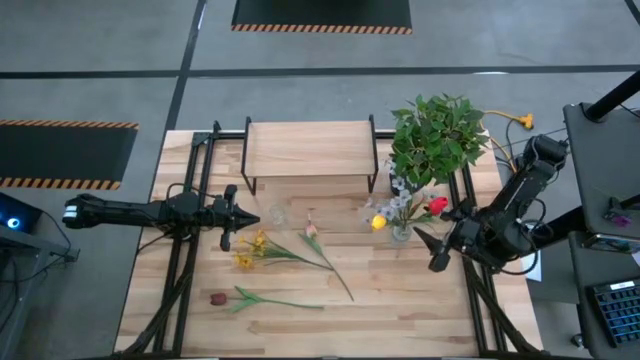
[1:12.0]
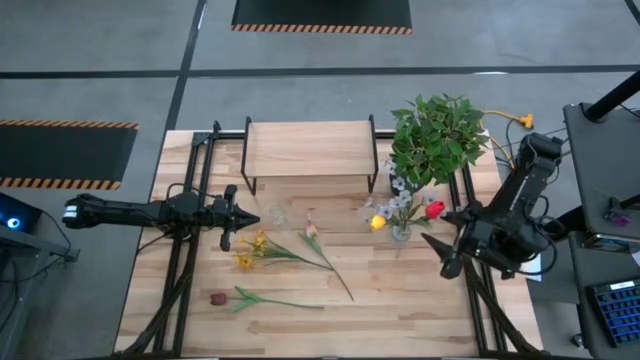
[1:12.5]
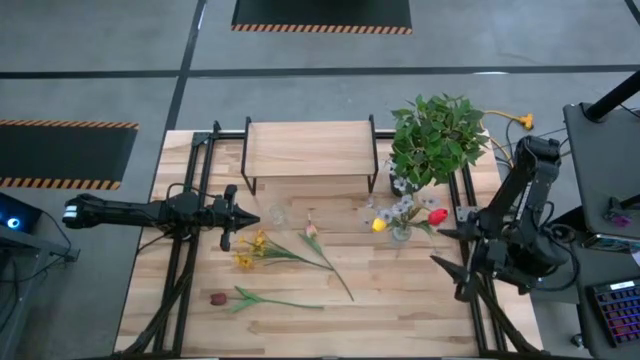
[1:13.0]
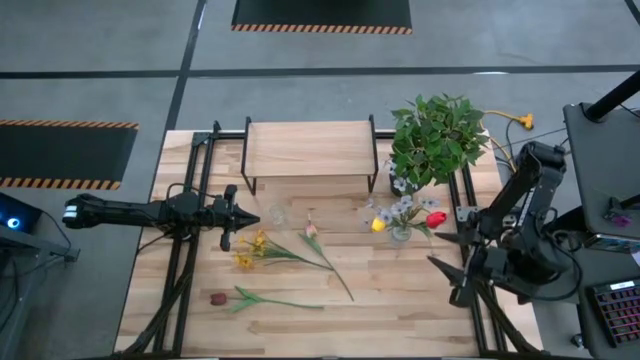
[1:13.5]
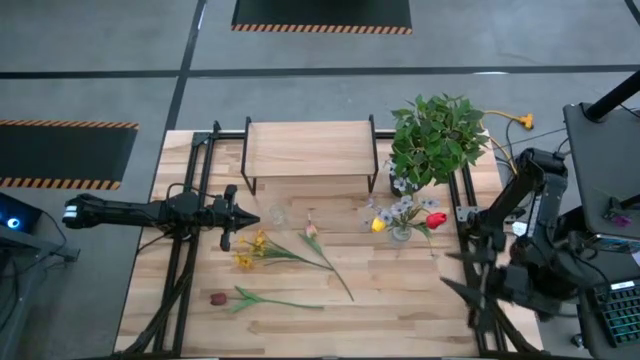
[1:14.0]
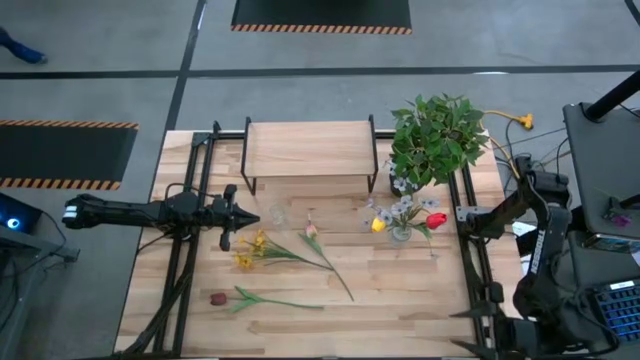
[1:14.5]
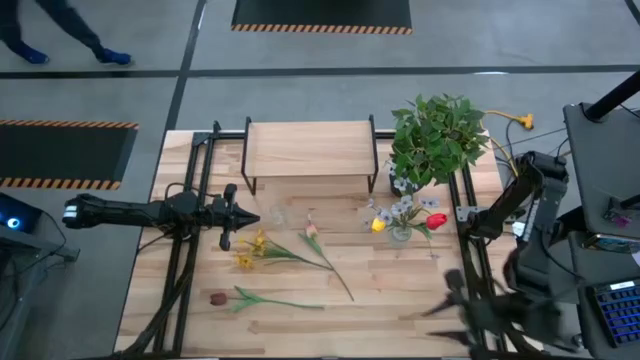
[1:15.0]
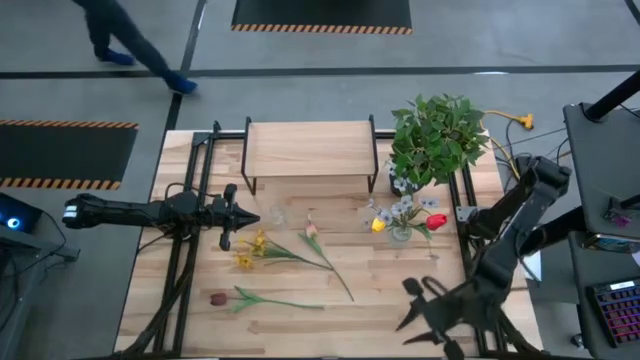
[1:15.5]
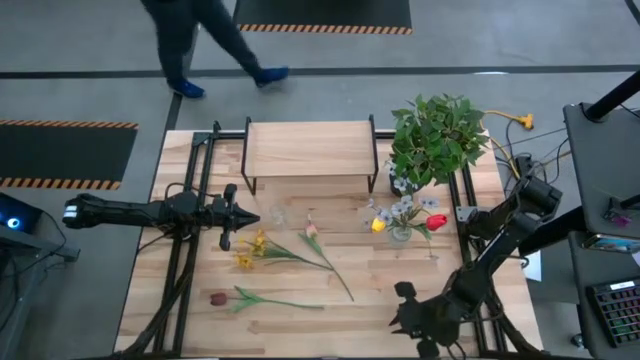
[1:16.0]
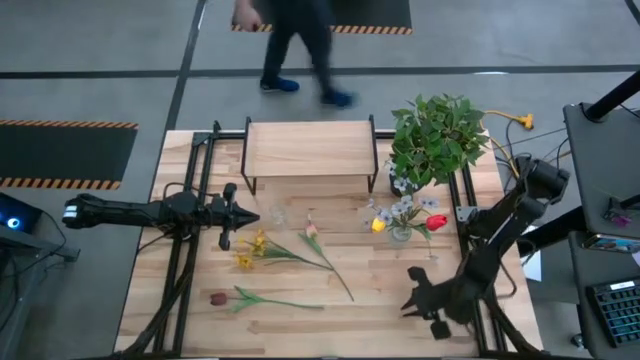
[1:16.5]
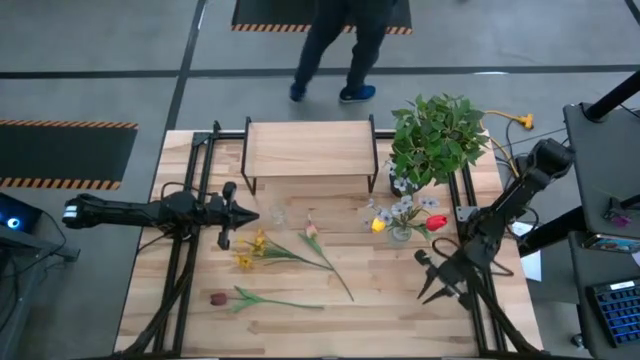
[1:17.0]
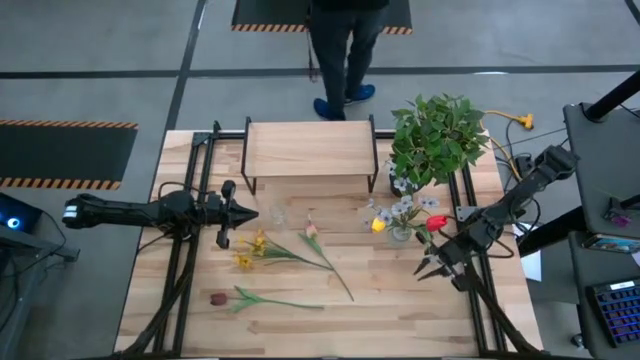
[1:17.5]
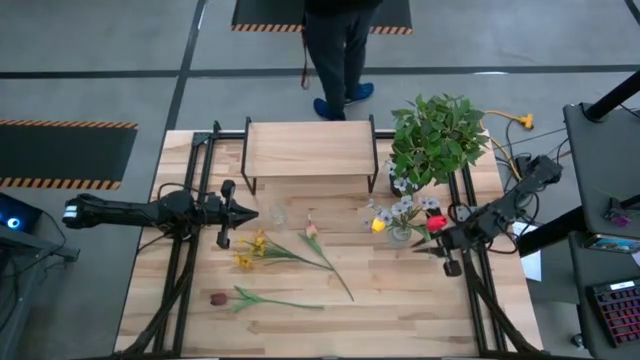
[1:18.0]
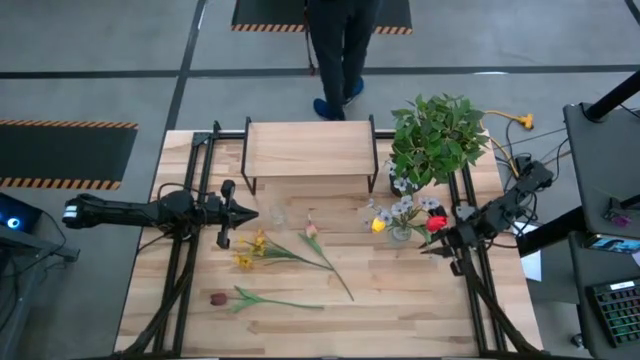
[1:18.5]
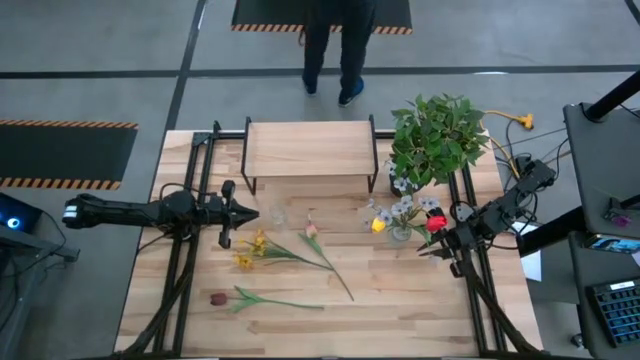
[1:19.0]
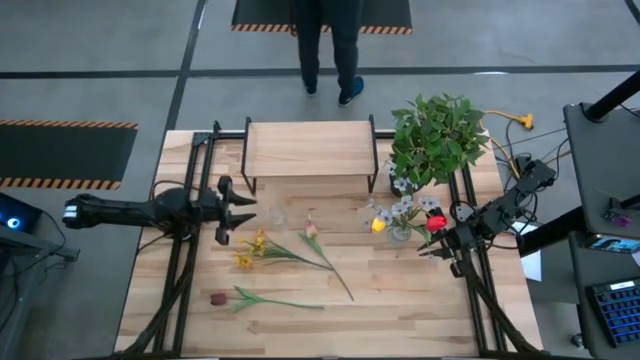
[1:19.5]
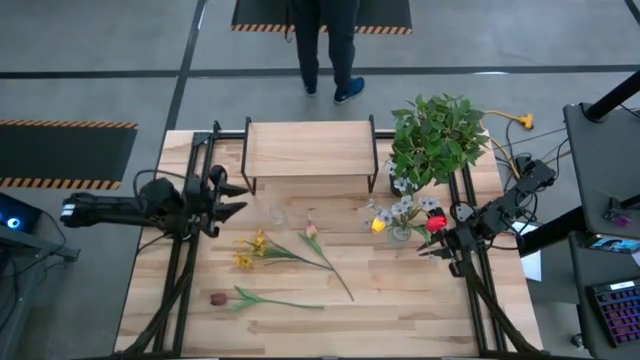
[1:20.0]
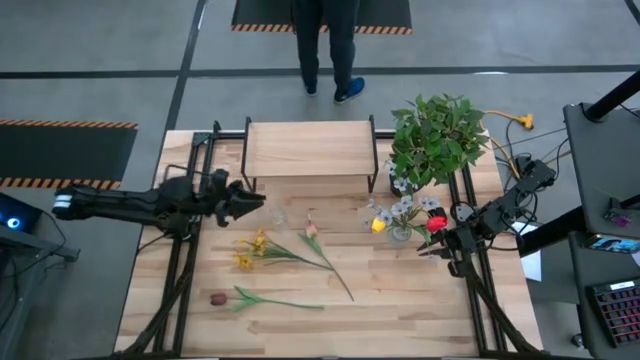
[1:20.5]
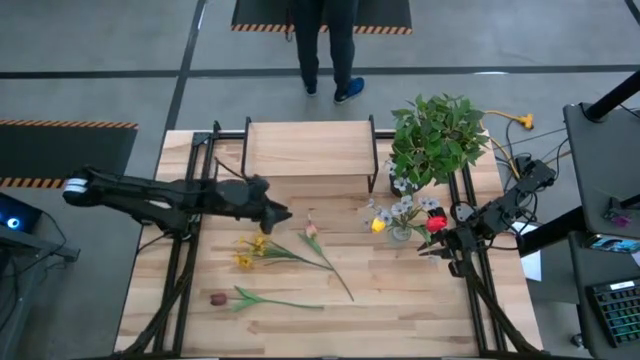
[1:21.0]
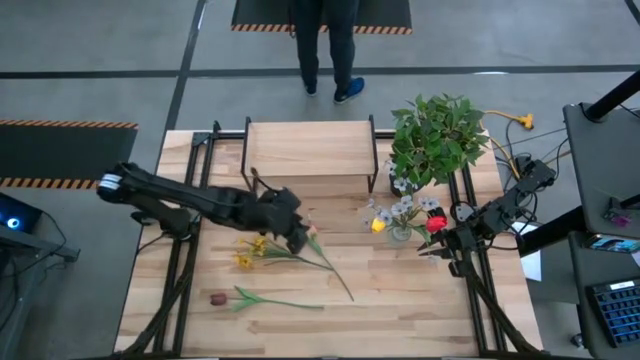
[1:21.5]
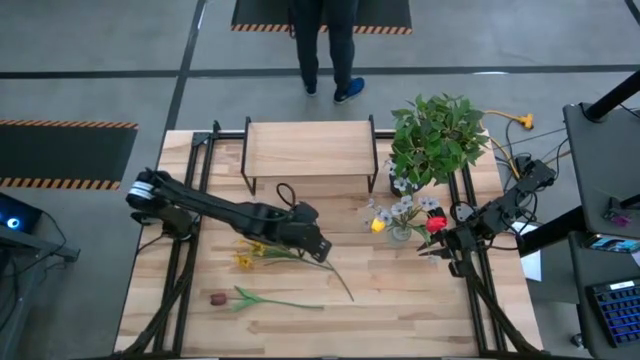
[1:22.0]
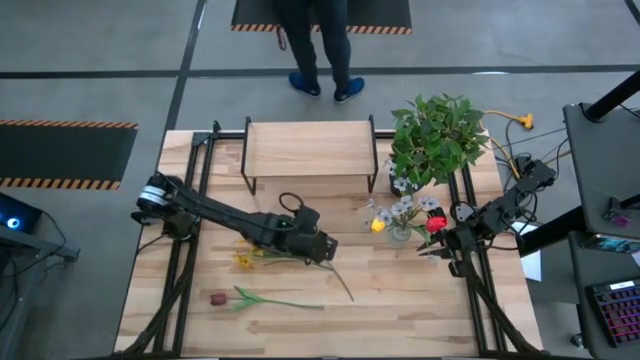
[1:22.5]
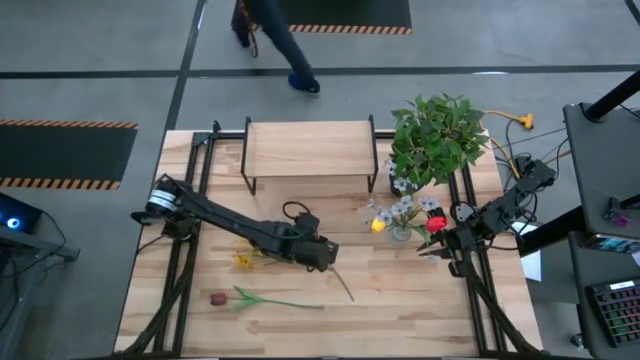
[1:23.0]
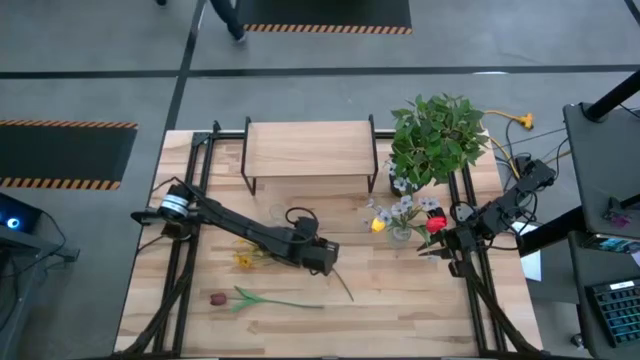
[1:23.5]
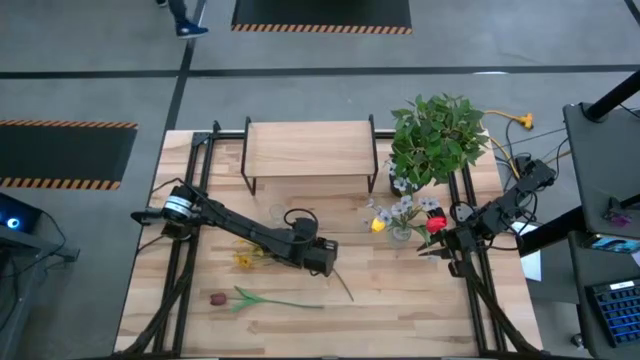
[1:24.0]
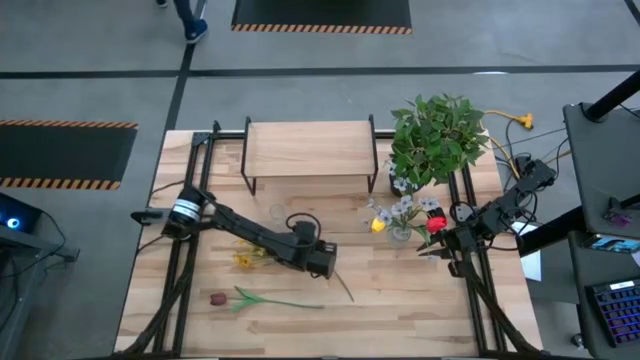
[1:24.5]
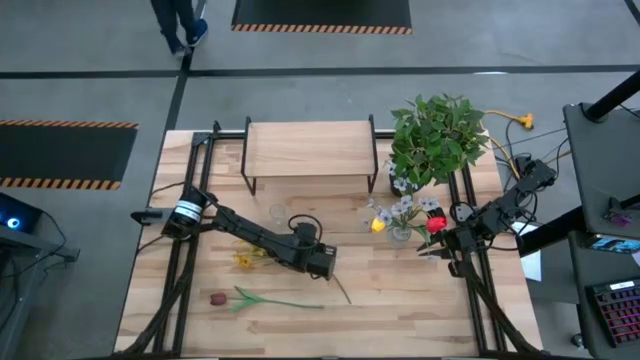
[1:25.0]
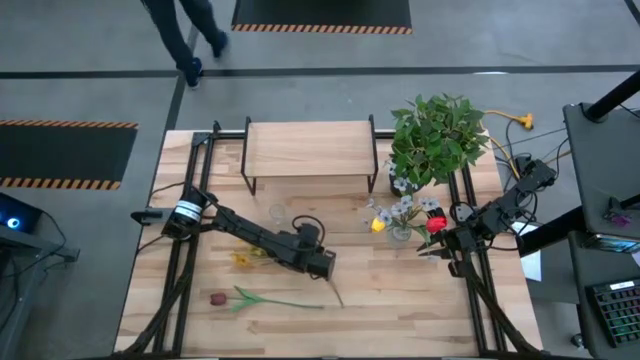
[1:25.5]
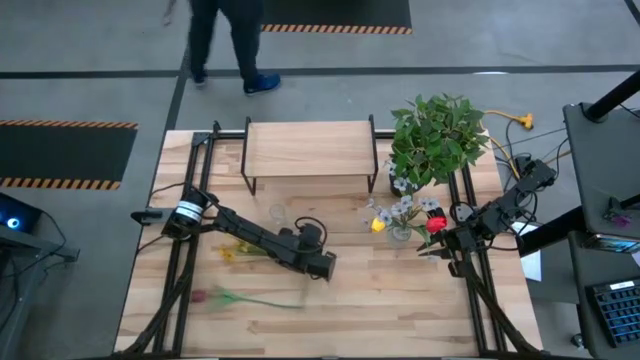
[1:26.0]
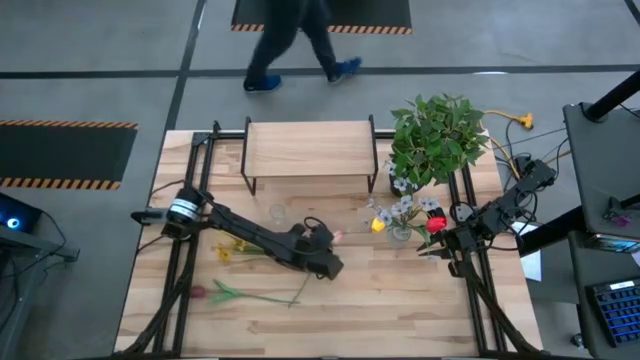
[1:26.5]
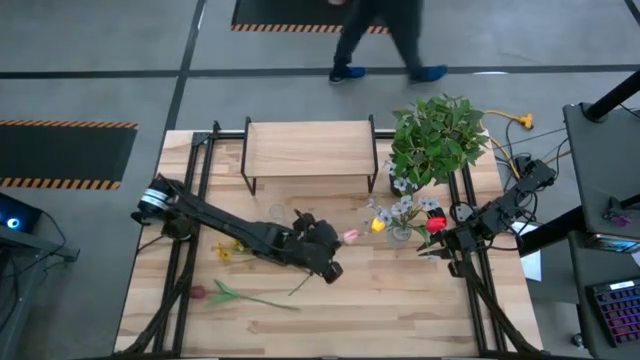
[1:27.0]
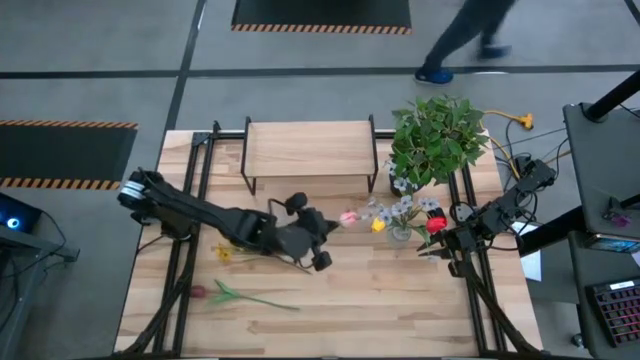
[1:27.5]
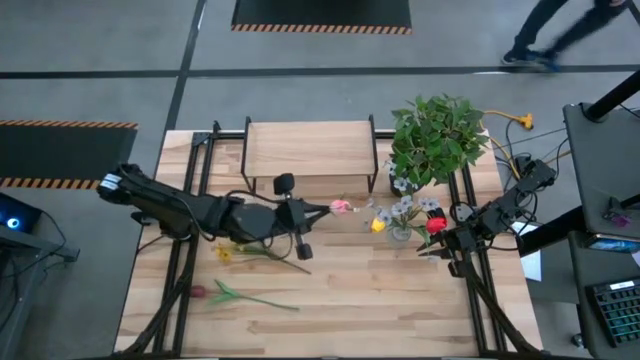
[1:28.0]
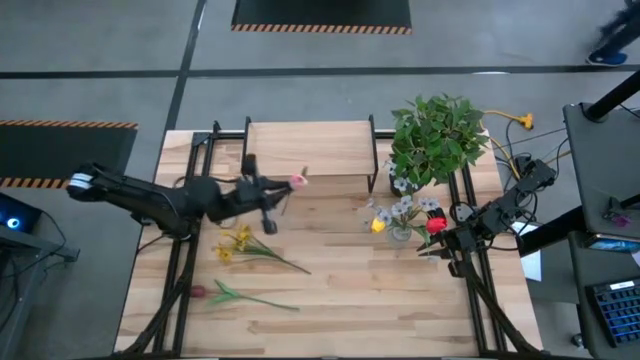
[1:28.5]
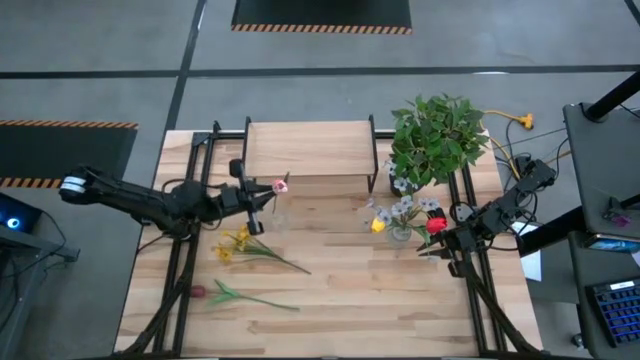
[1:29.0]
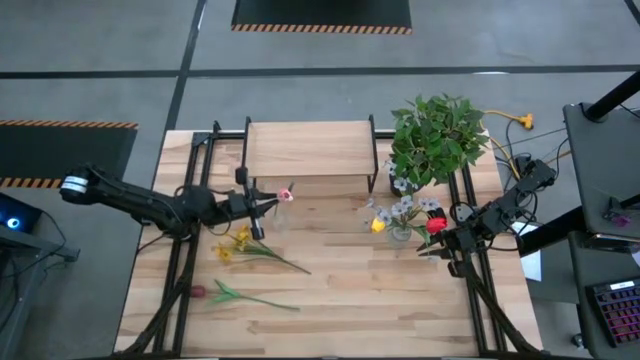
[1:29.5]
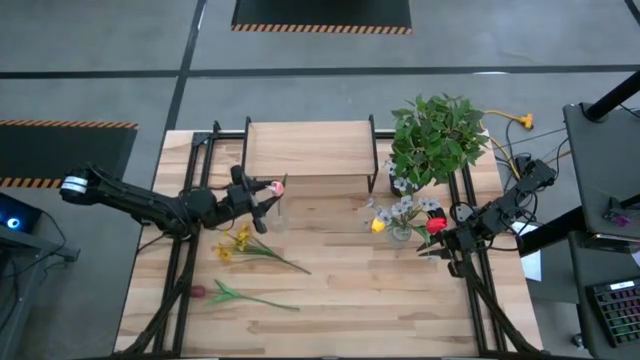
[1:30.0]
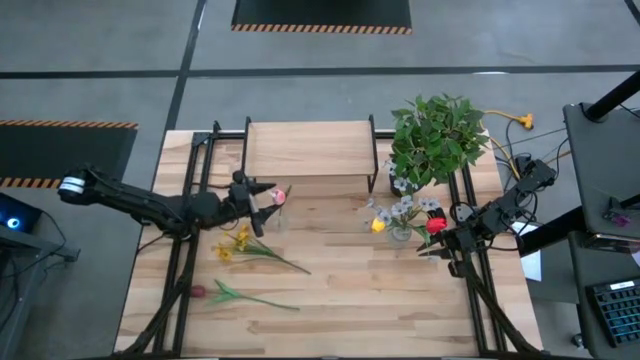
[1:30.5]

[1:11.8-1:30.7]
Task: Pick and place flowers into a vace then onto a shelf
Put the pink tulip into the left transparent vase

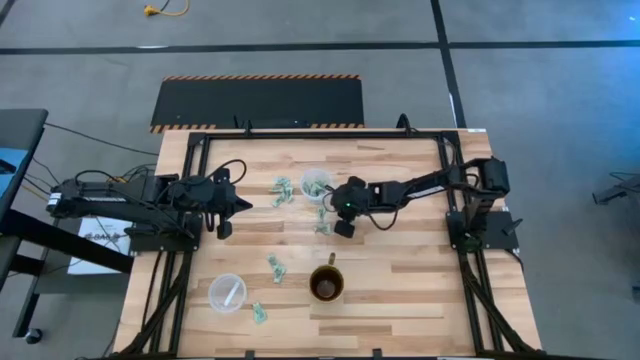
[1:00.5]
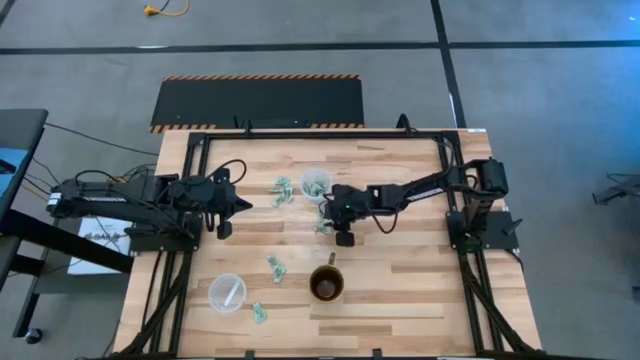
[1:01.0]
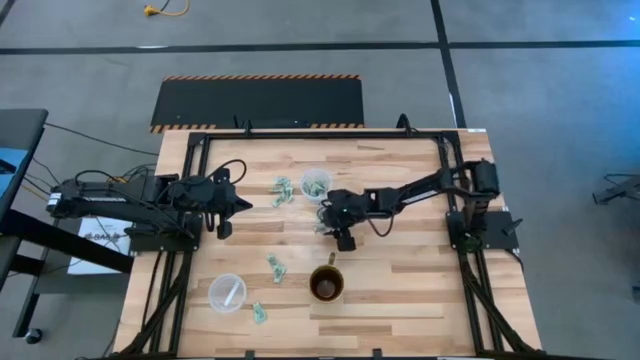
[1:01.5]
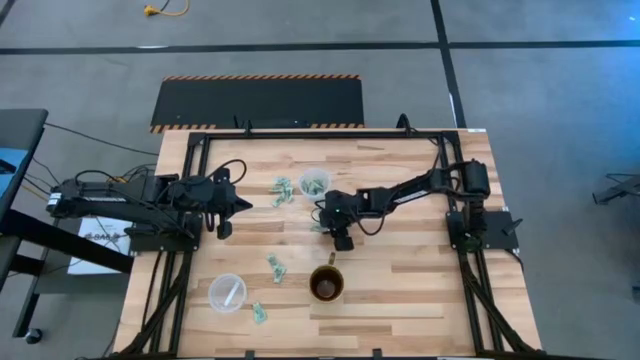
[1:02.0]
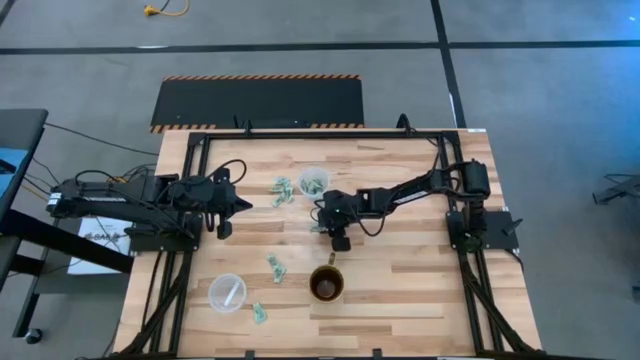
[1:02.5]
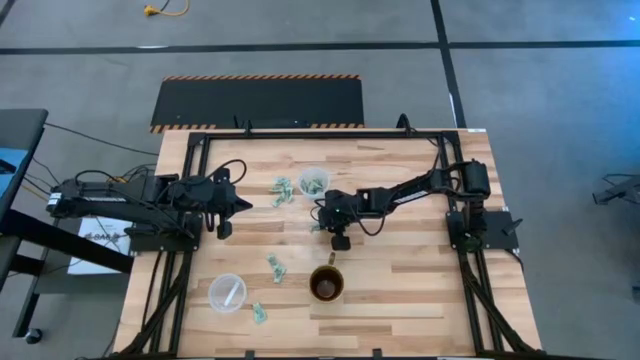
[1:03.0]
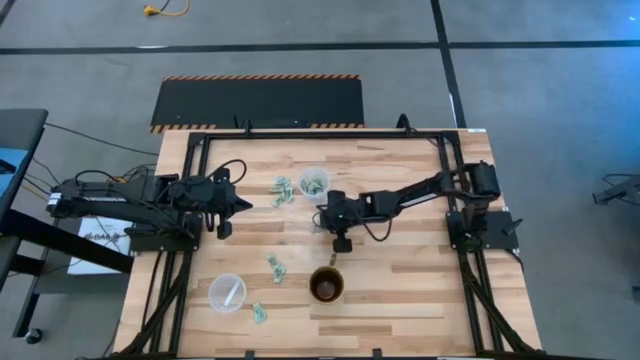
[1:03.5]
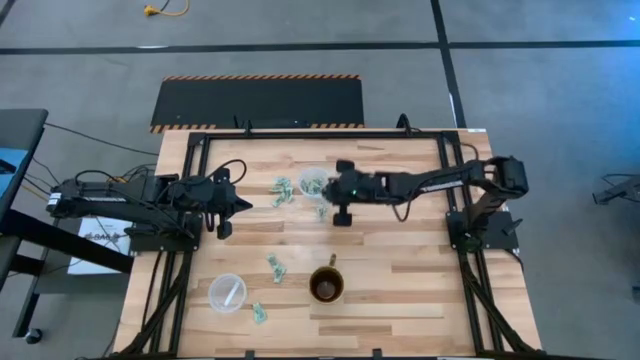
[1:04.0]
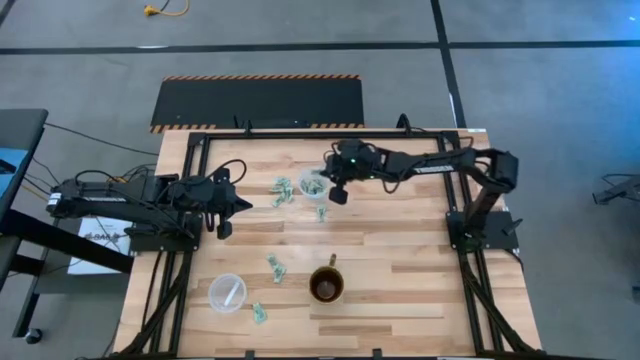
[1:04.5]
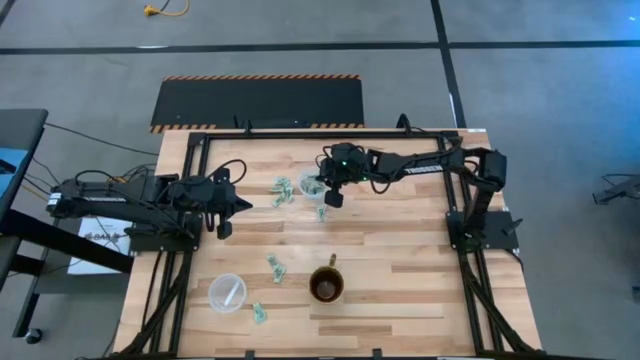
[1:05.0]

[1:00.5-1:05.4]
Task: Pick and place items into bin
Put the stevia packet into the top transparent bin
